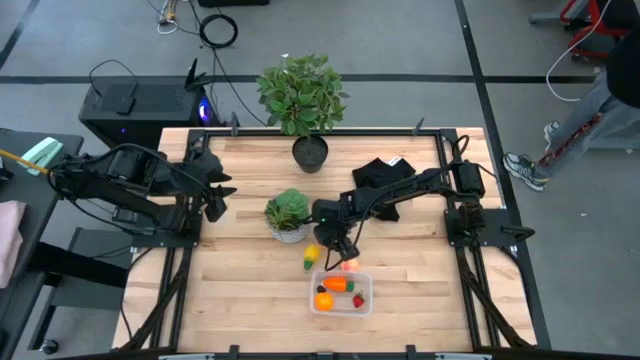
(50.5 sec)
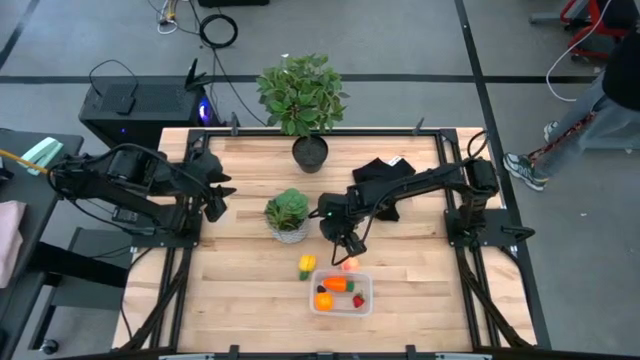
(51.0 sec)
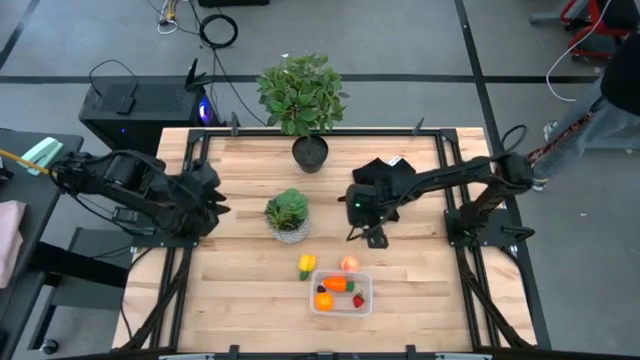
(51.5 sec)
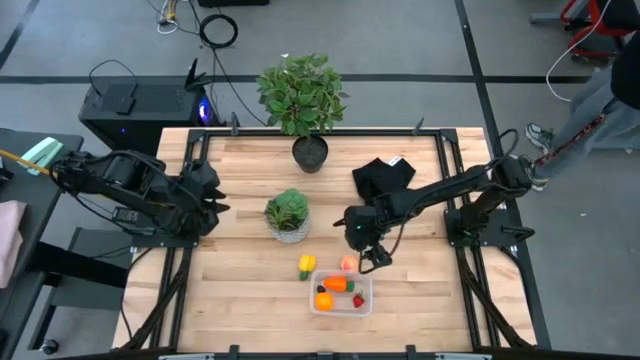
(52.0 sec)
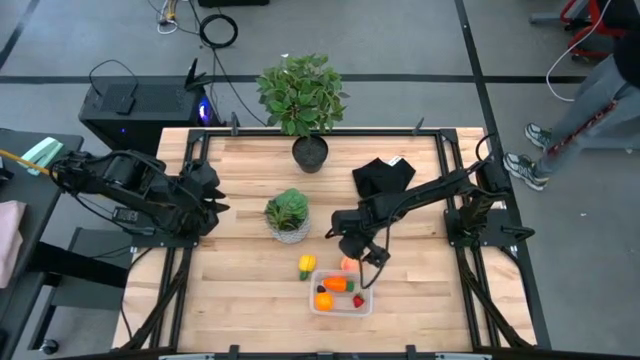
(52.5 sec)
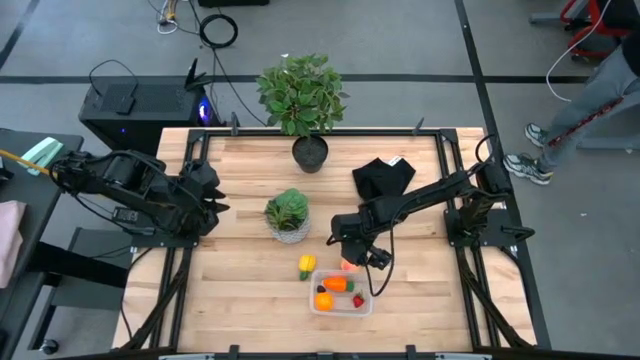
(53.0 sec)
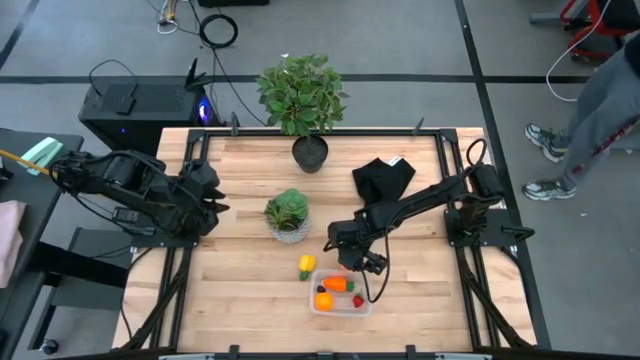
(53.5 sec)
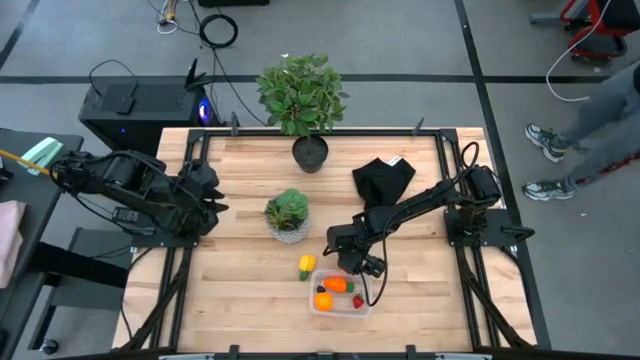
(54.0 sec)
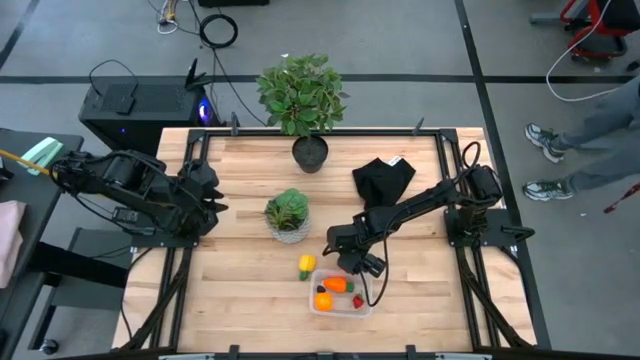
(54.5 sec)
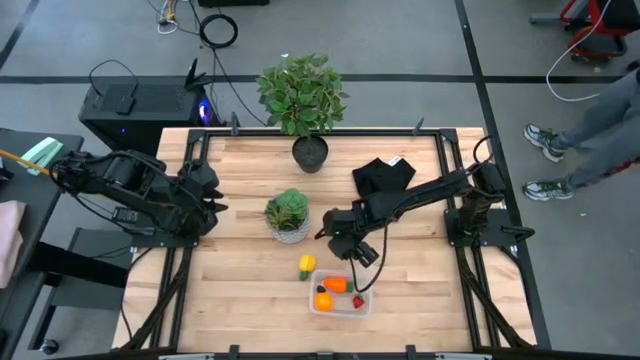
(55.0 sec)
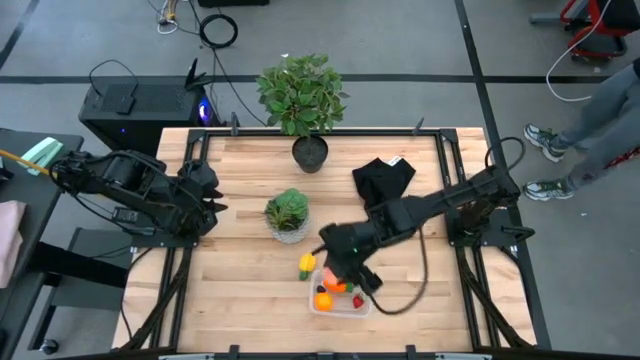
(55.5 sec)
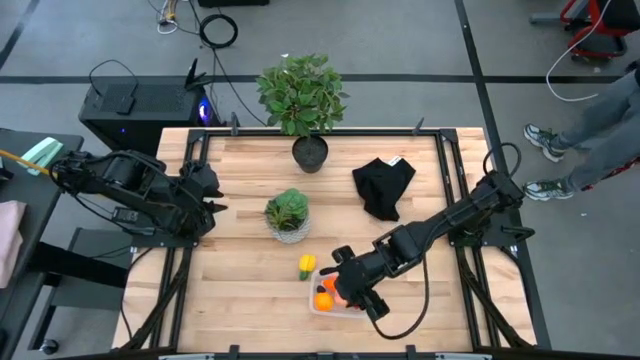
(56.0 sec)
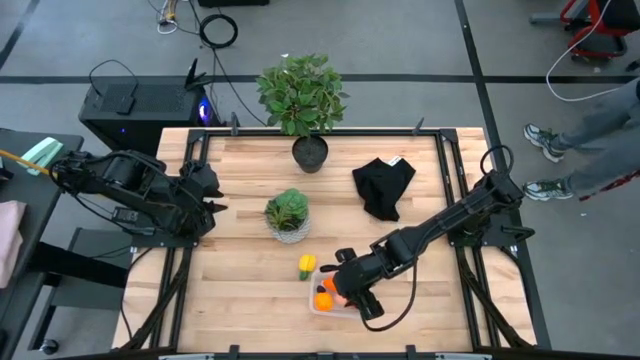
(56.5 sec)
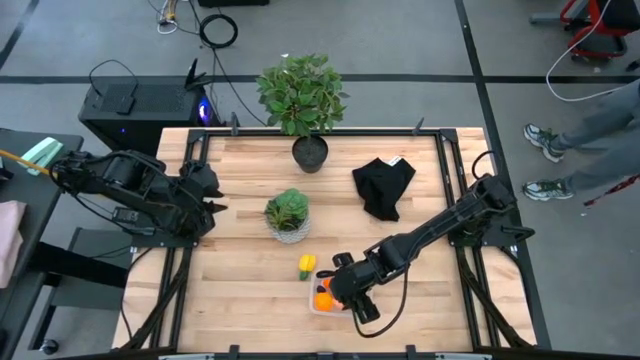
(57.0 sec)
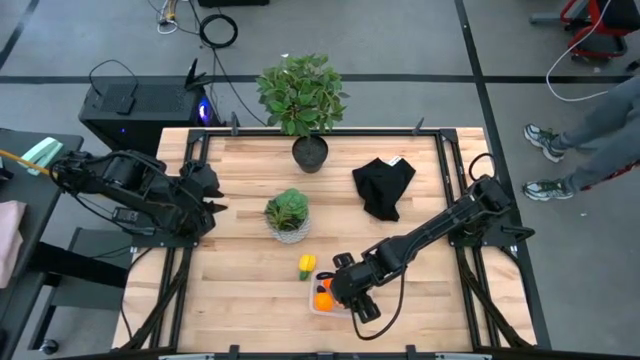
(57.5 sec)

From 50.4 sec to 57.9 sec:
Task: Pick and placing Produce into tupperware
Put the peach in the transparent bin

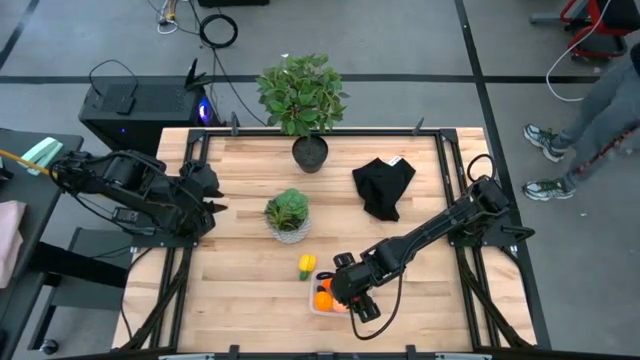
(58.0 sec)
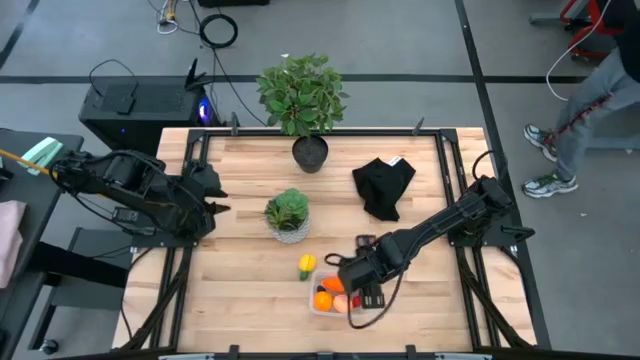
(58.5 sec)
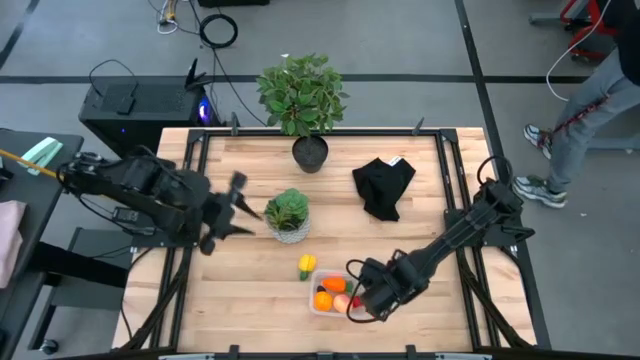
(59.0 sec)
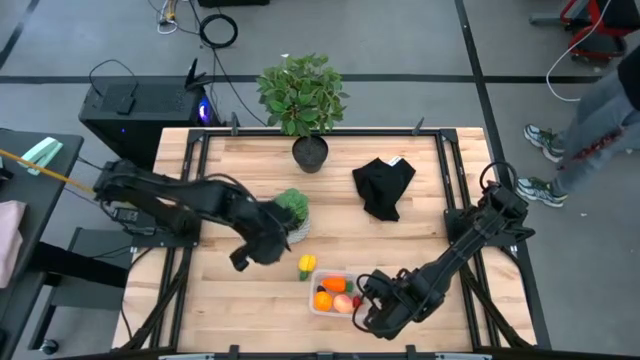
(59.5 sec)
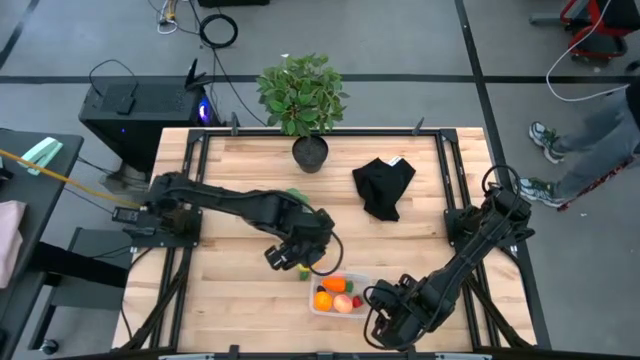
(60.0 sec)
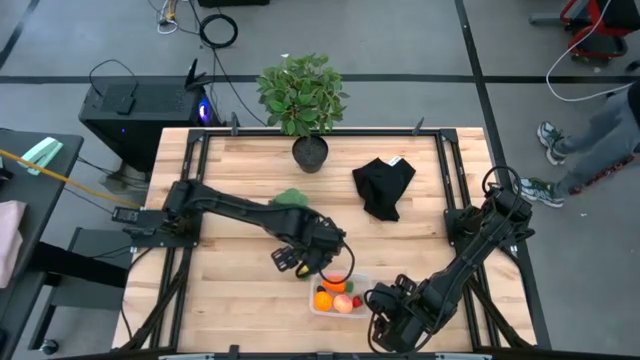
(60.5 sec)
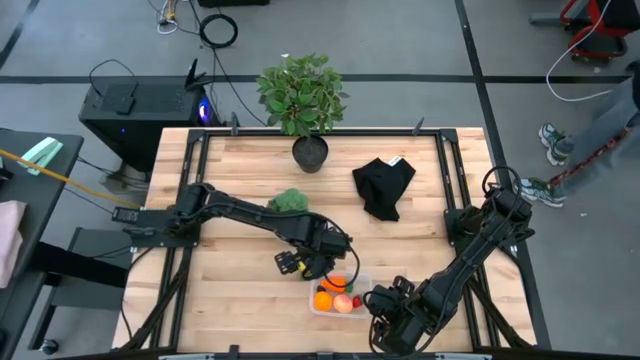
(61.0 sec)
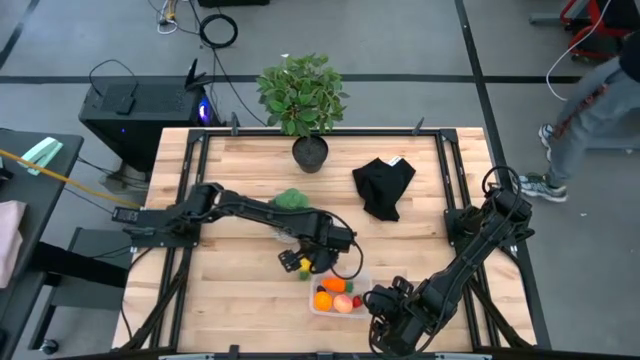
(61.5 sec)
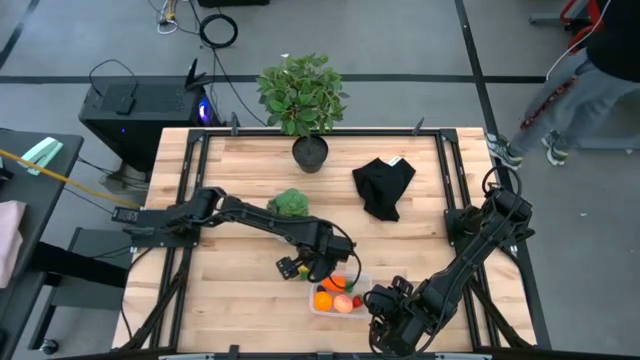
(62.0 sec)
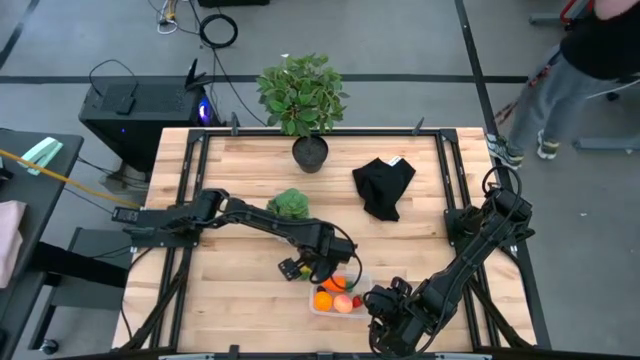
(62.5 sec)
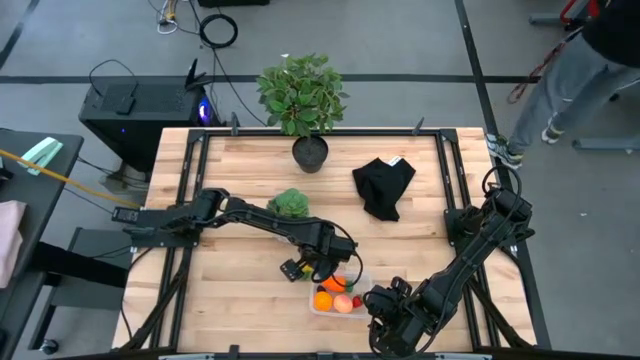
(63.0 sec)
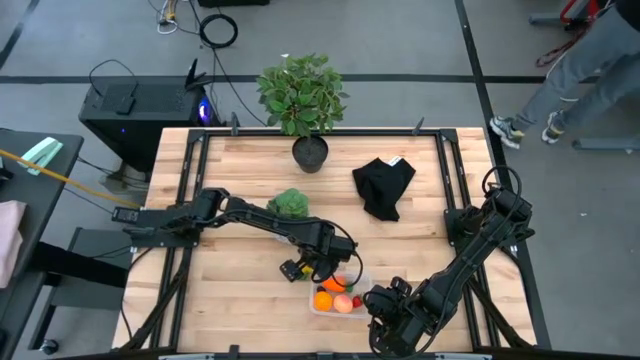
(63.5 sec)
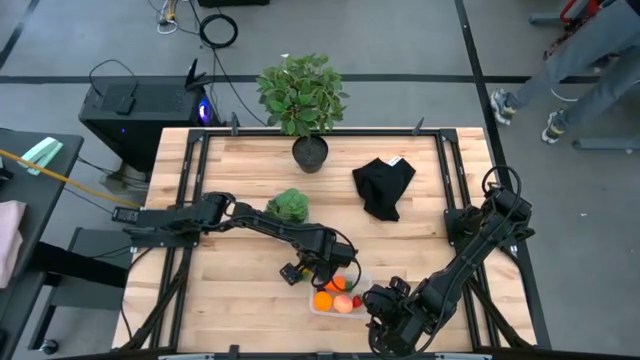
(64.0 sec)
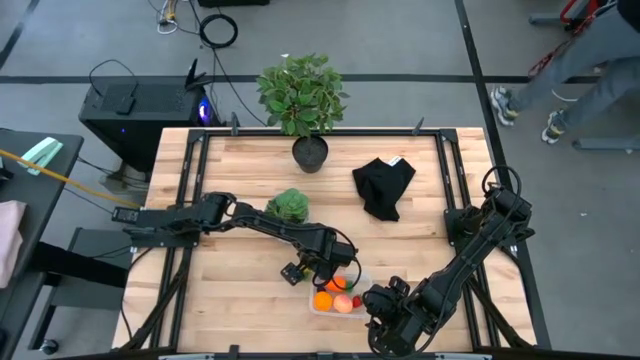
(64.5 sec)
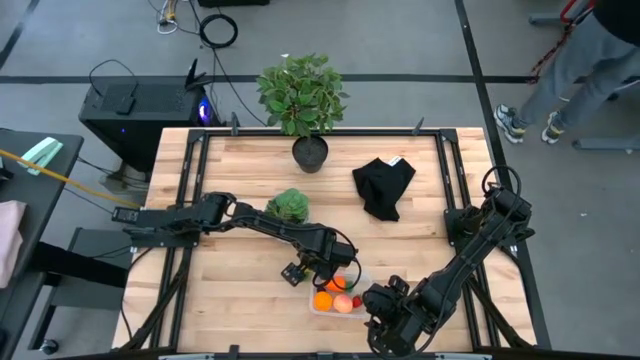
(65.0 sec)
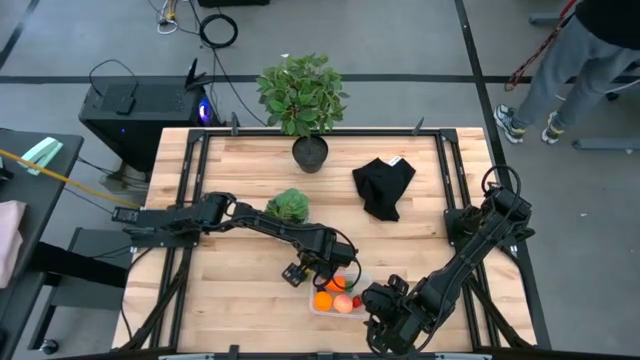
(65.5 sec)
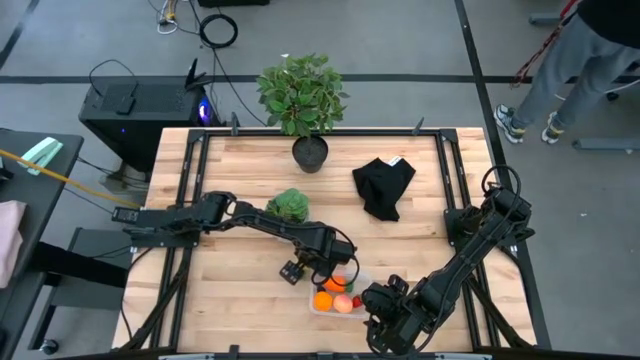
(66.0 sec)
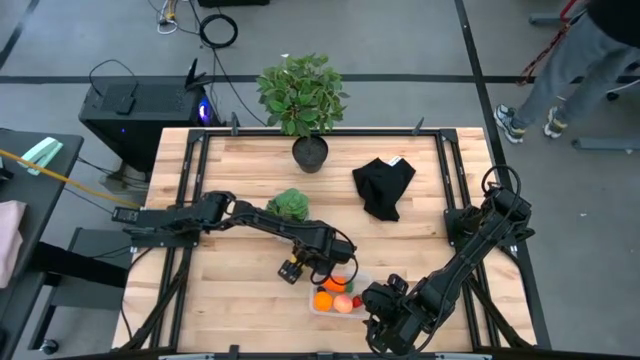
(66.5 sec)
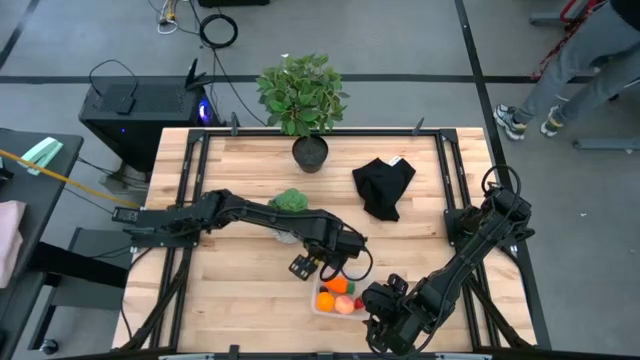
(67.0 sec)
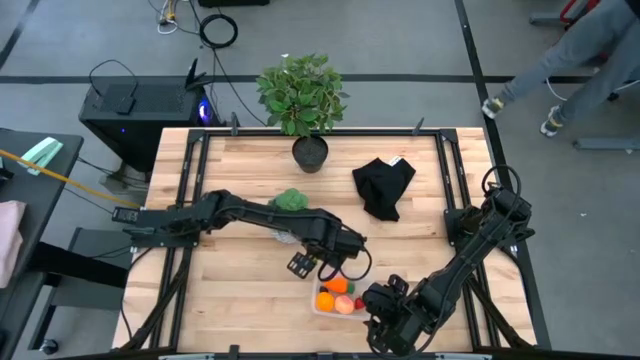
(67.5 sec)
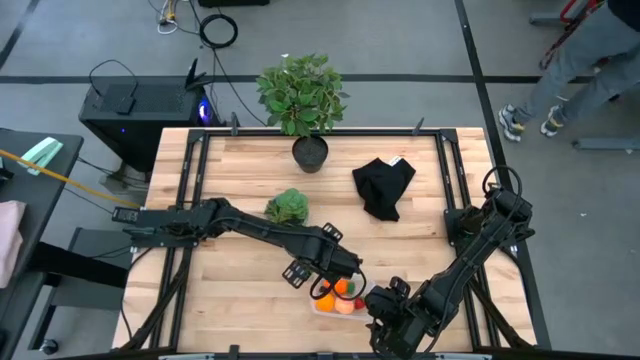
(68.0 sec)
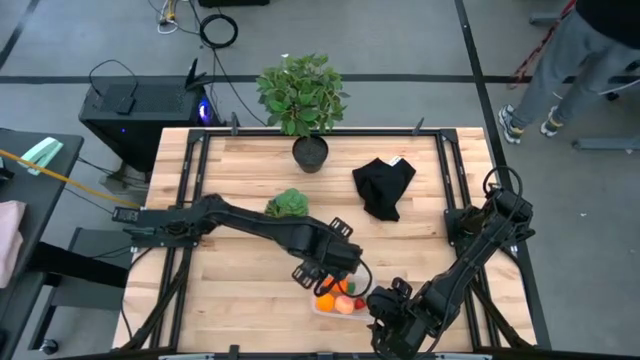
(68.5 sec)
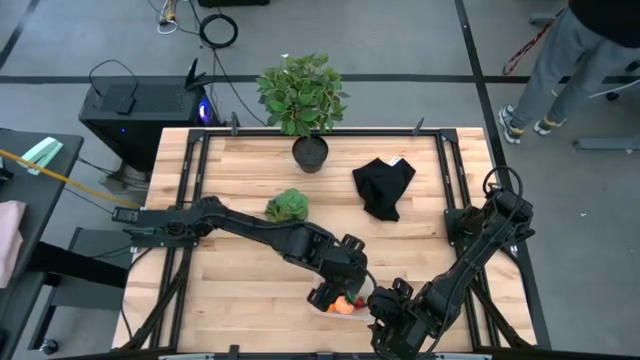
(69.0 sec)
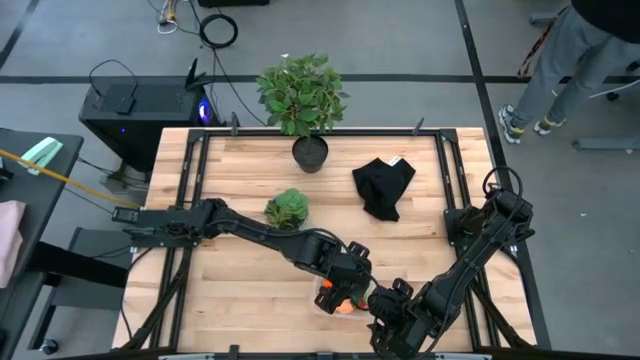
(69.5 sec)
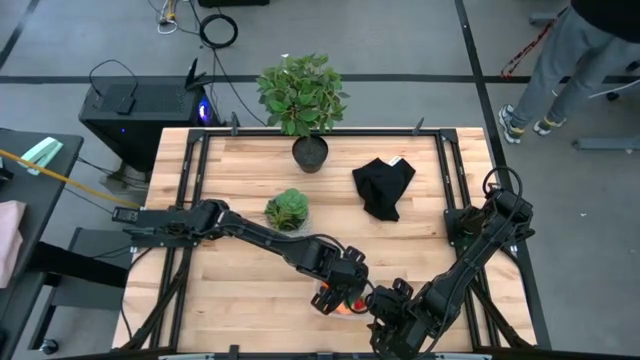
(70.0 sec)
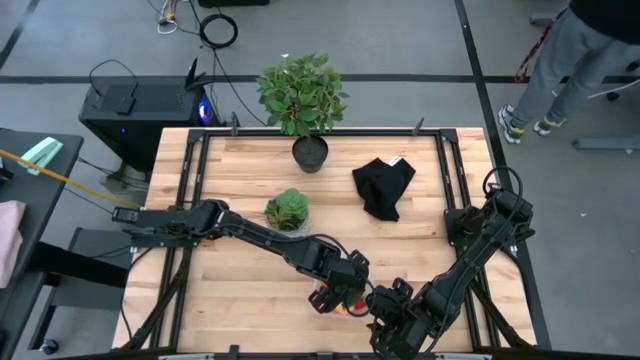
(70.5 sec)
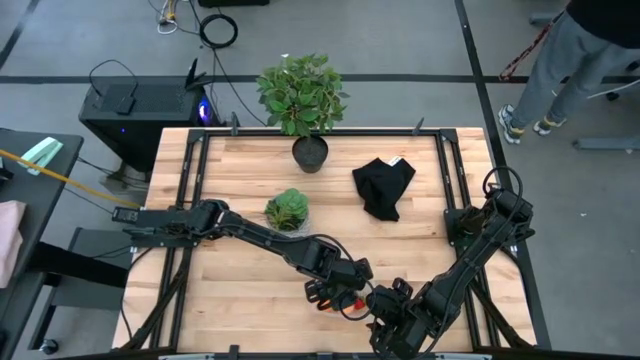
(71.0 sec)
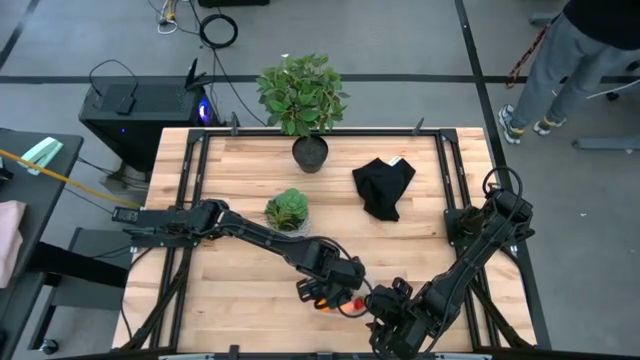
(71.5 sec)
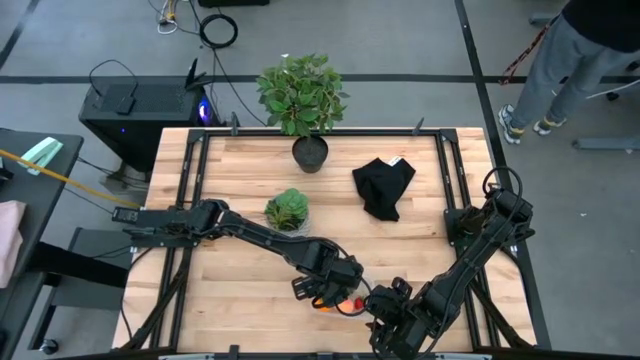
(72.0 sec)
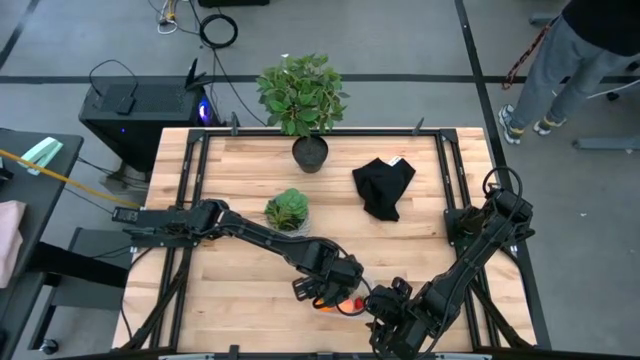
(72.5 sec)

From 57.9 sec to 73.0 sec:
Put the pineapple in the transparent bin
